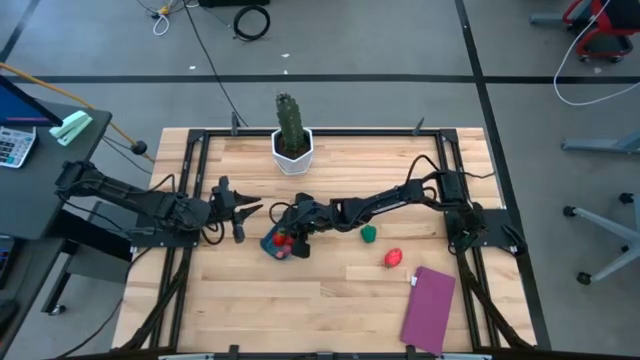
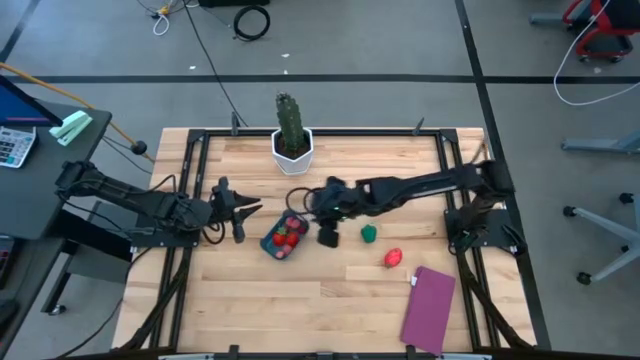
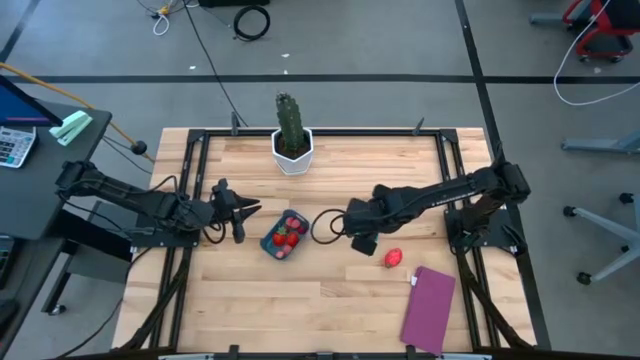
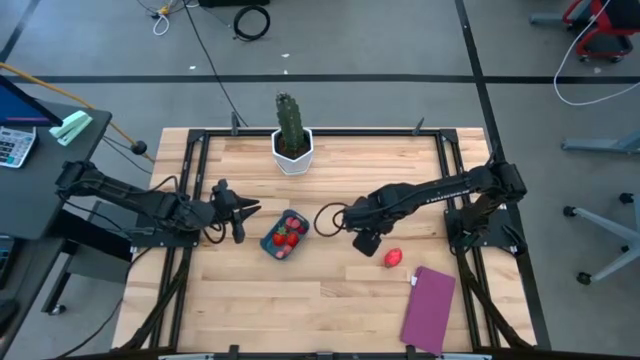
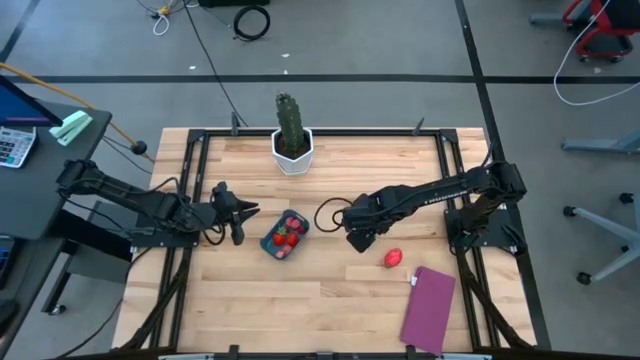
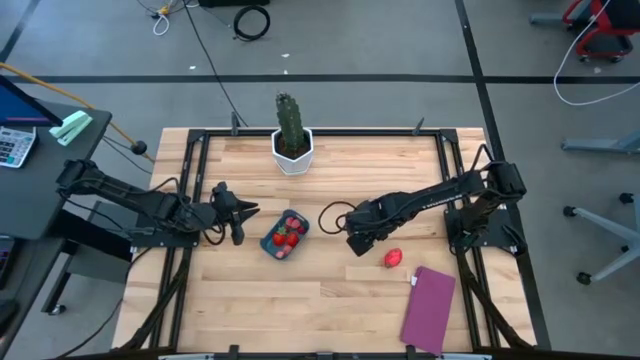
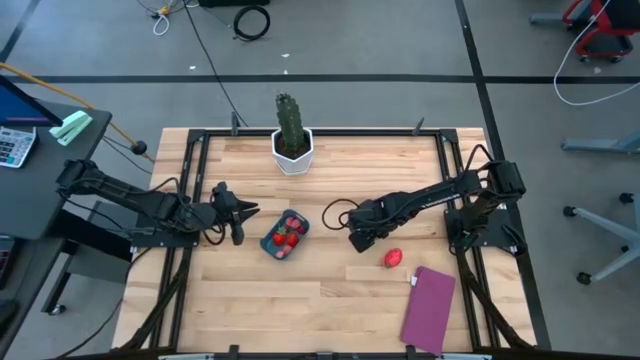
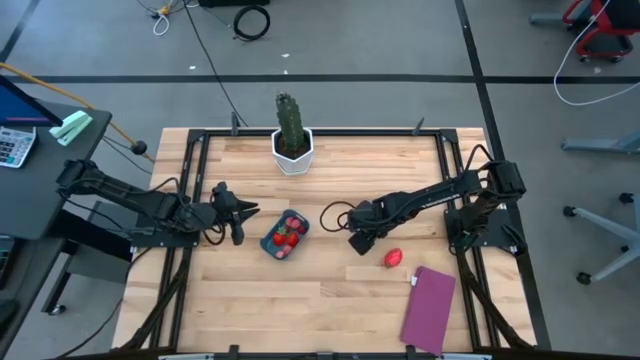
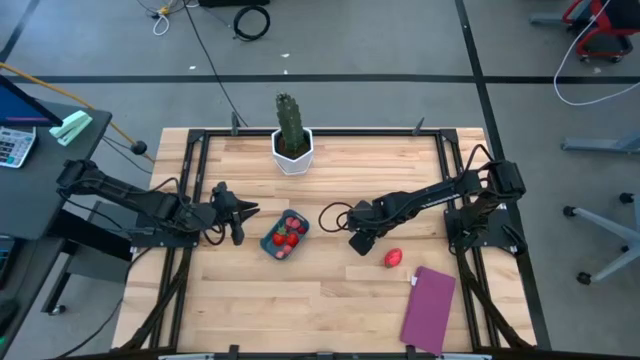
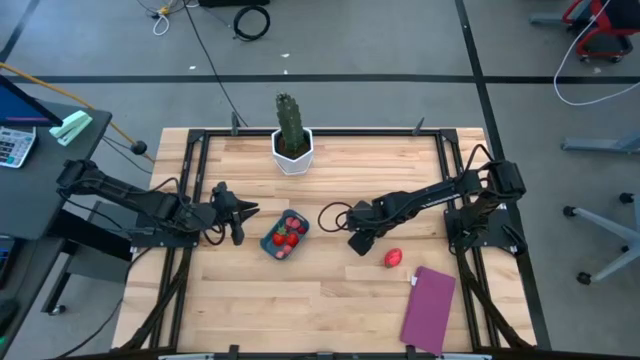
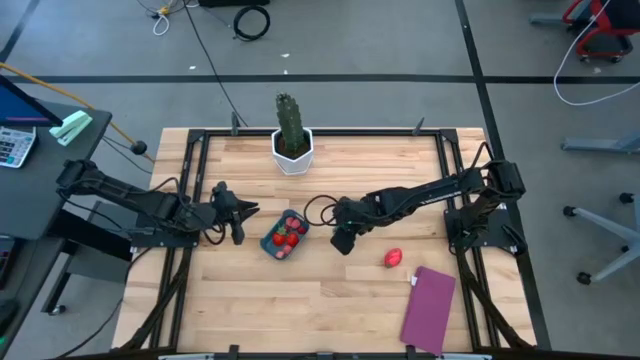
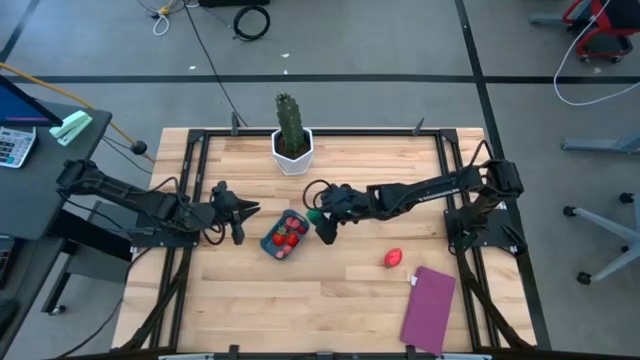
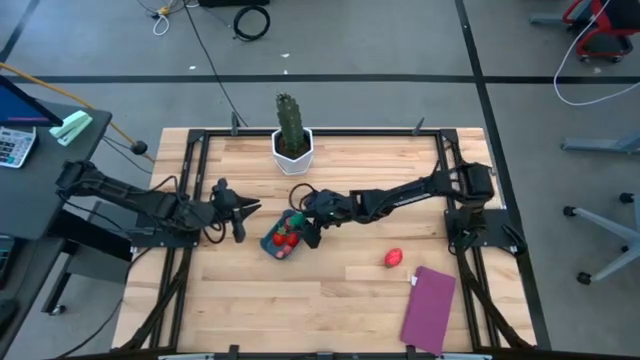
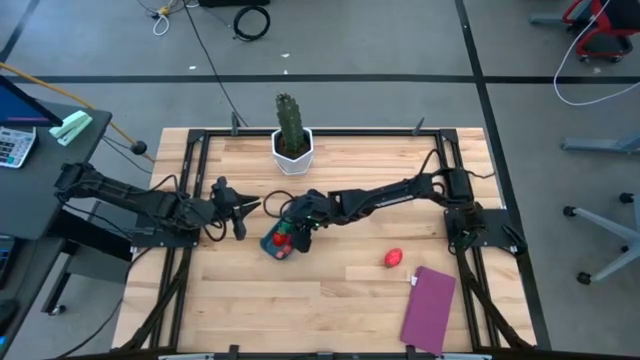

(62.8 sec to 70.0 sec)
Task: Pick and placing Produce into tupperware
Put the green bell pepper into the blue bin

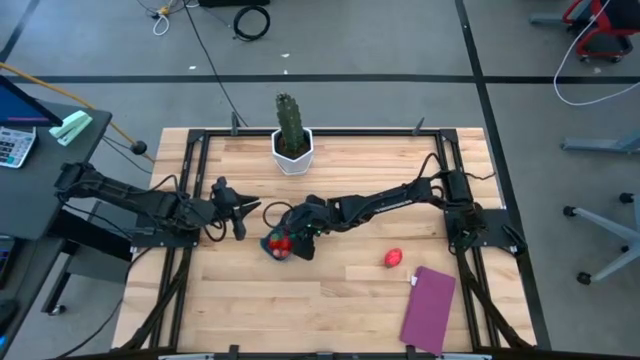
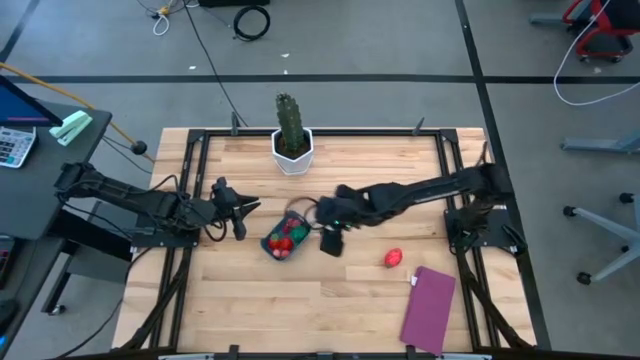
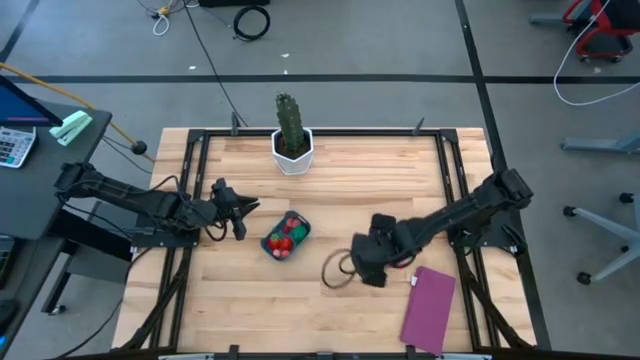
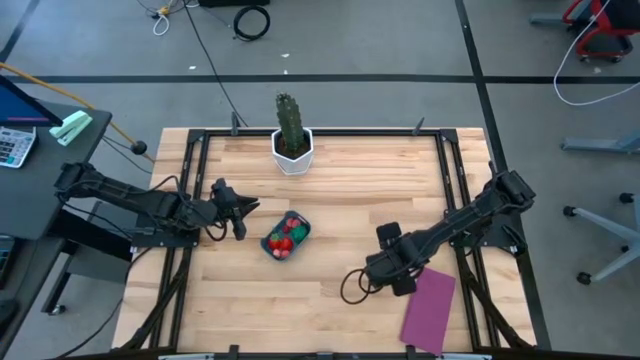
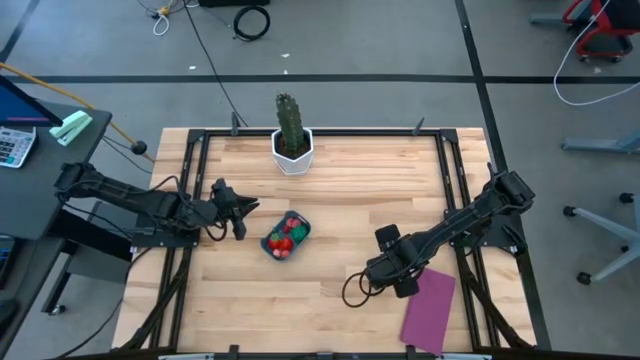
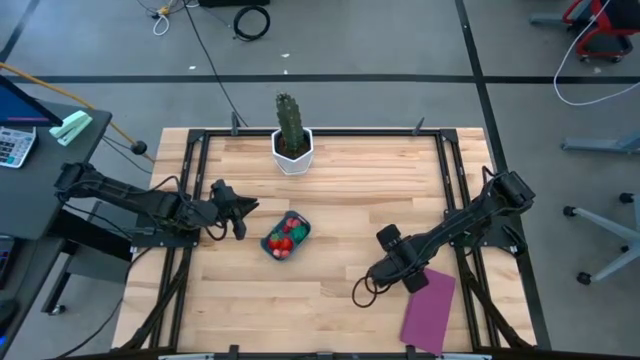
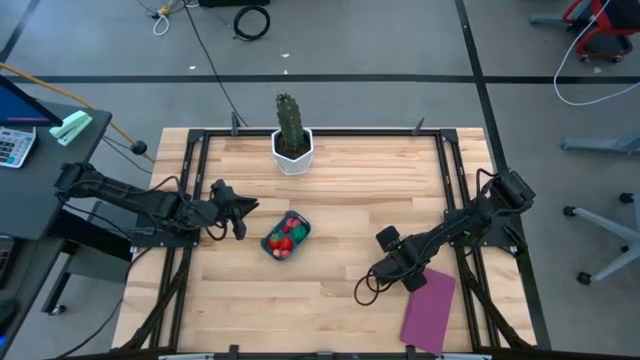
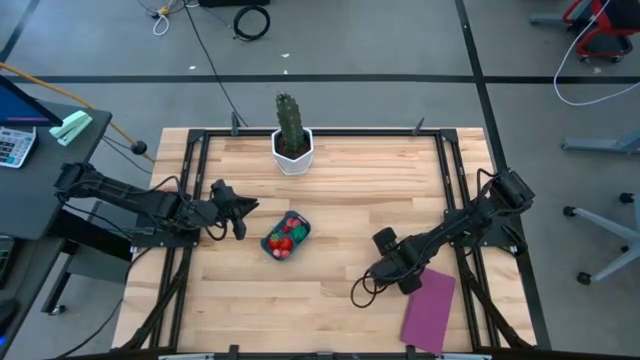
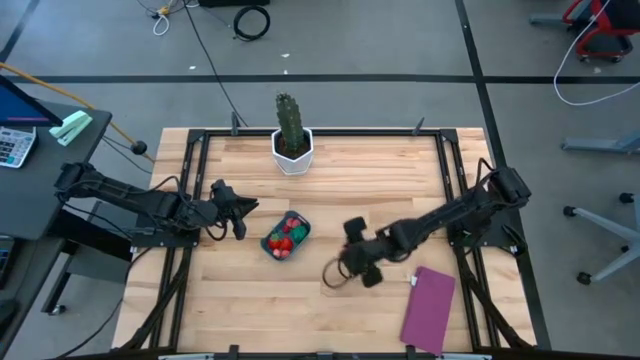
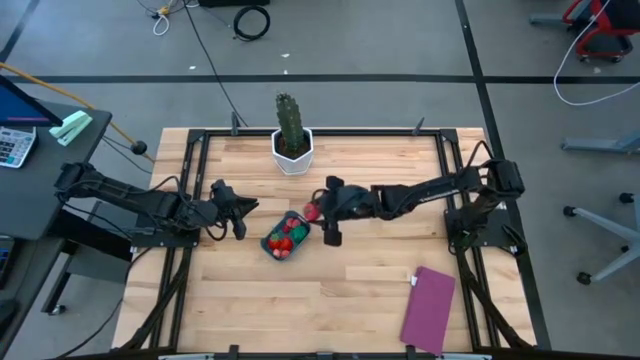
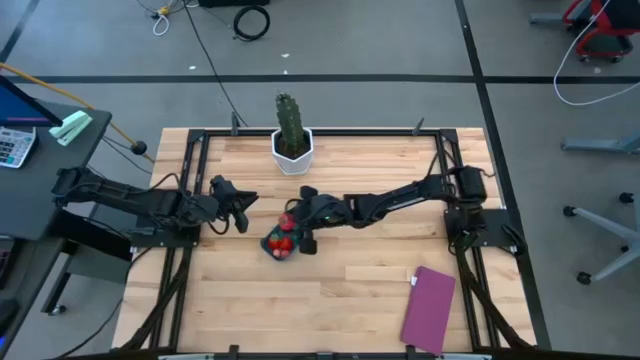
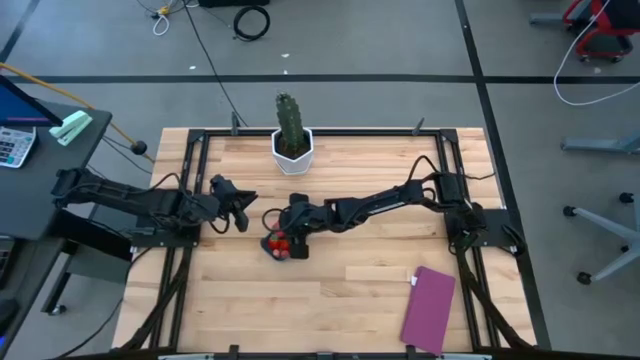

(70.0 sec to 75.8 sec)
Put the red dragon fruit into the blue bin

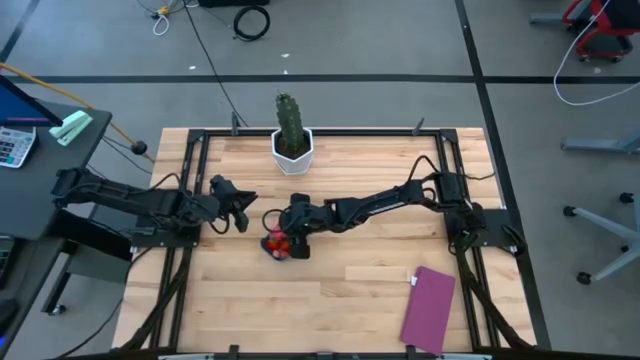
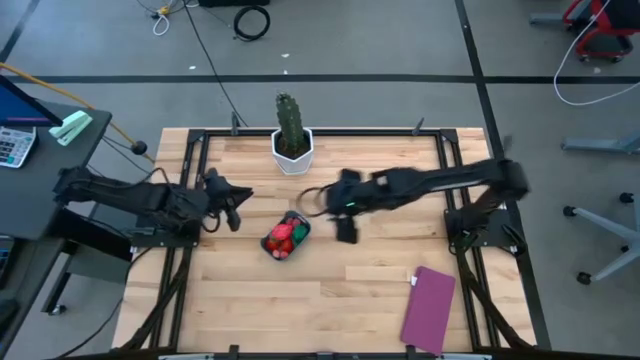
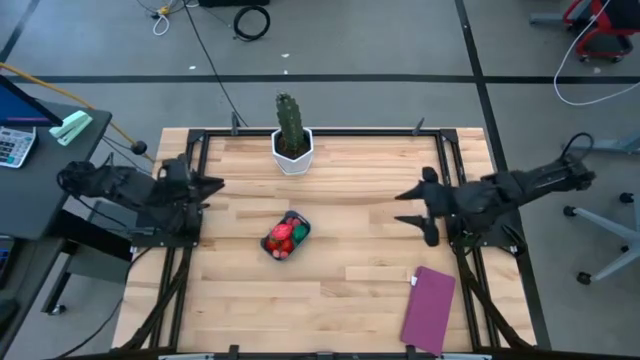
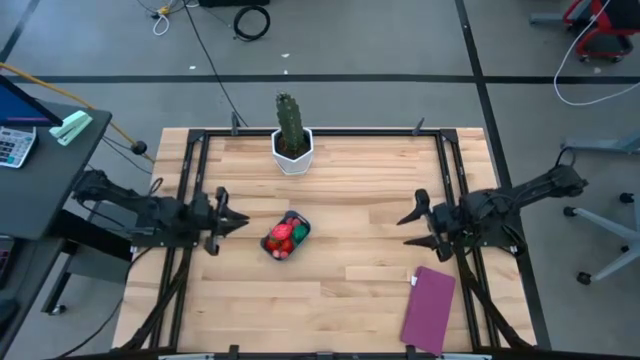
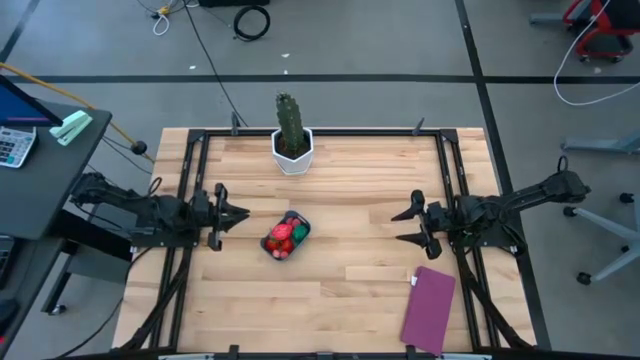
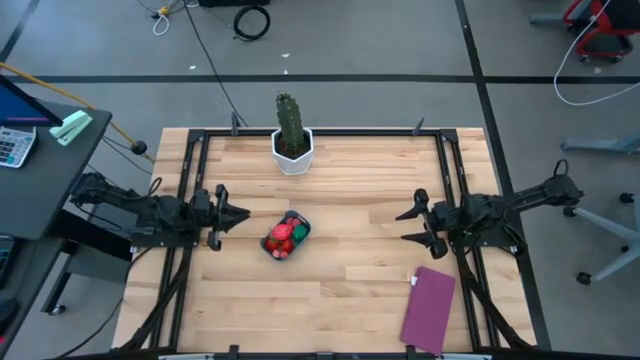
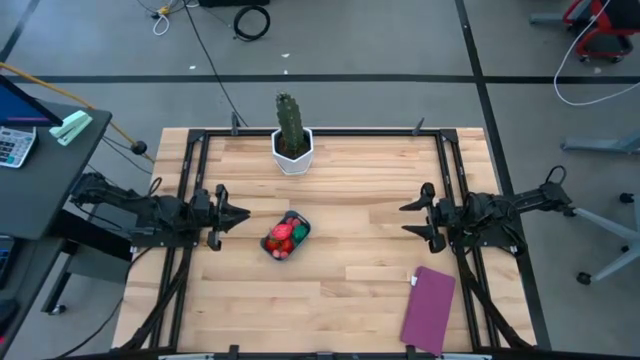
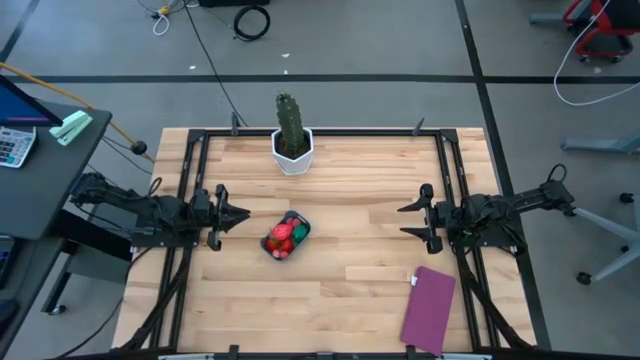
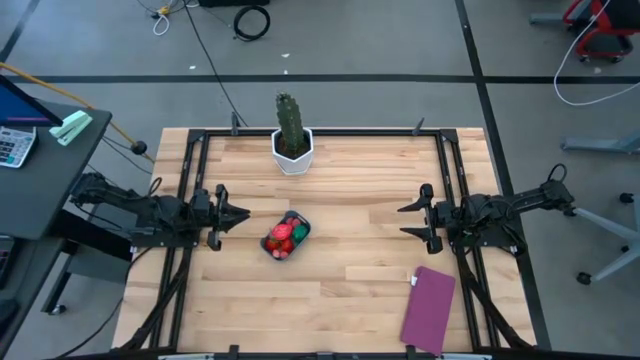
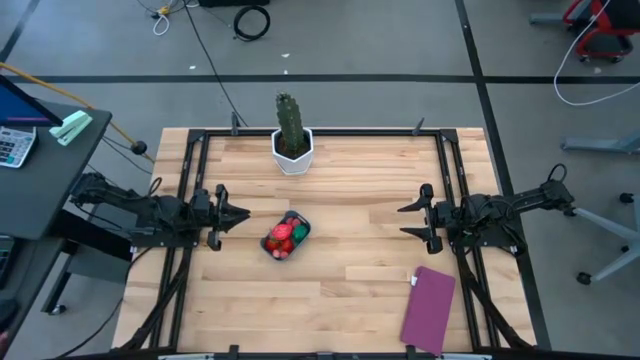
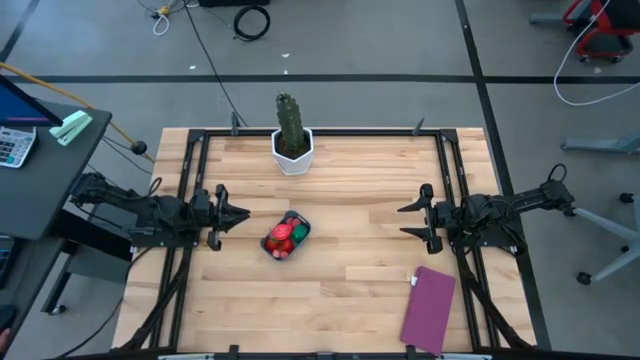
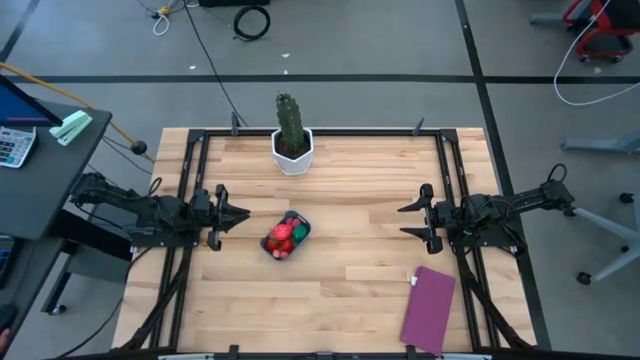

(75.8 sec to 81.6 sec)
Return to Home Position

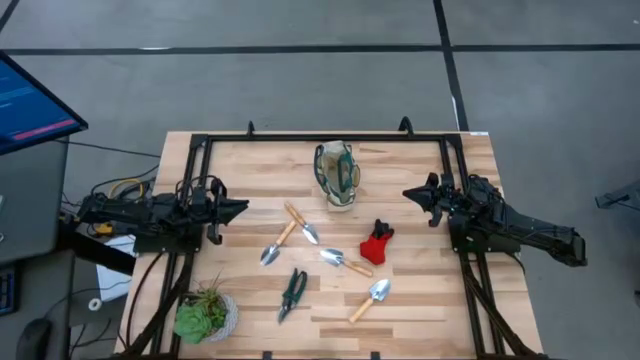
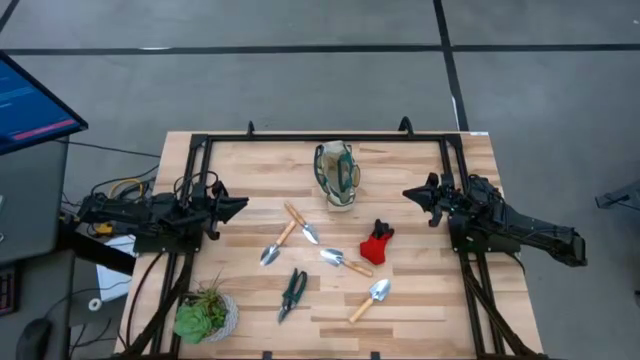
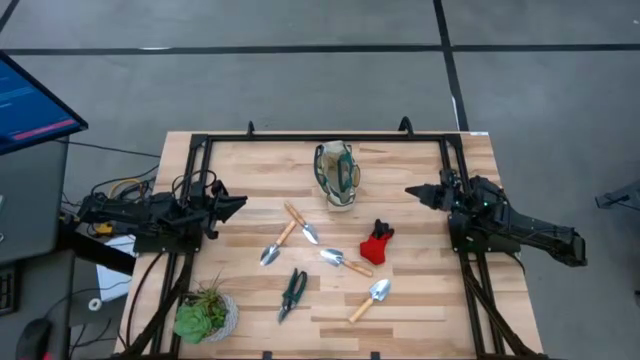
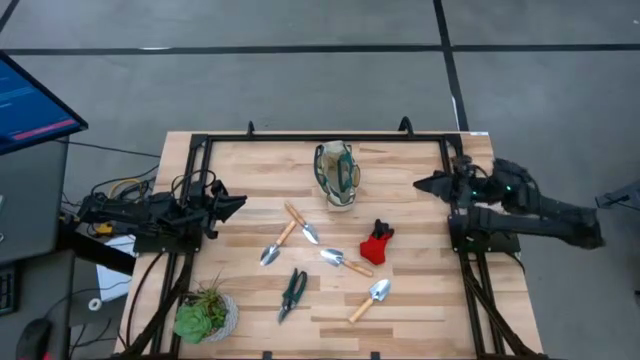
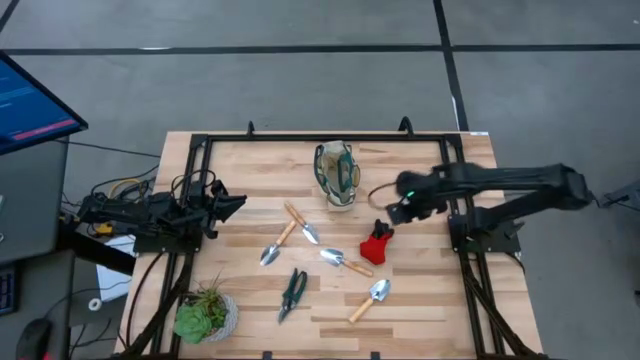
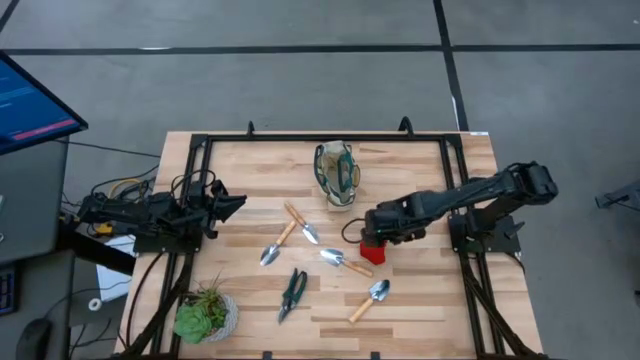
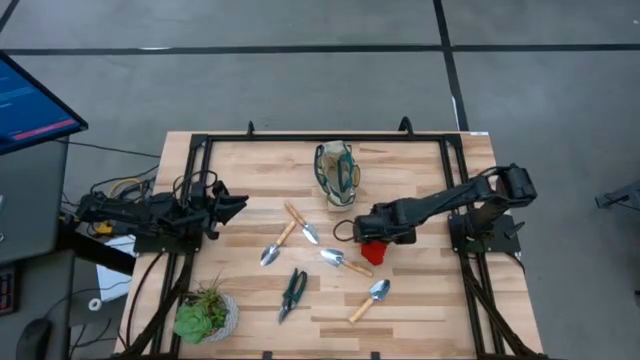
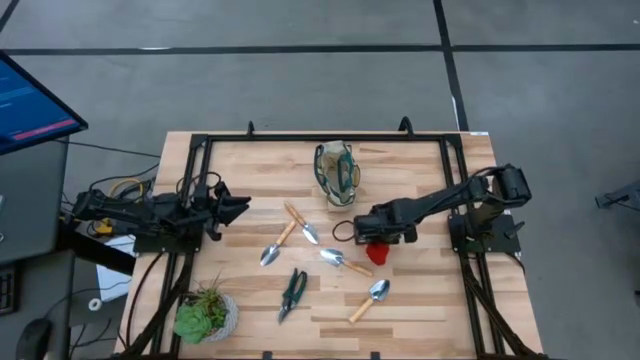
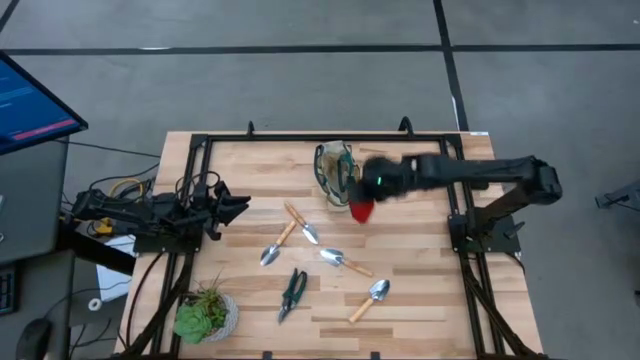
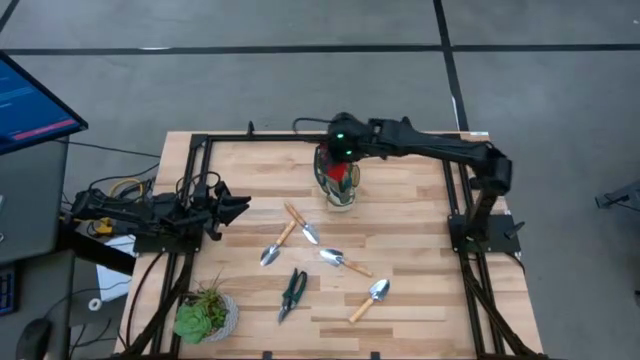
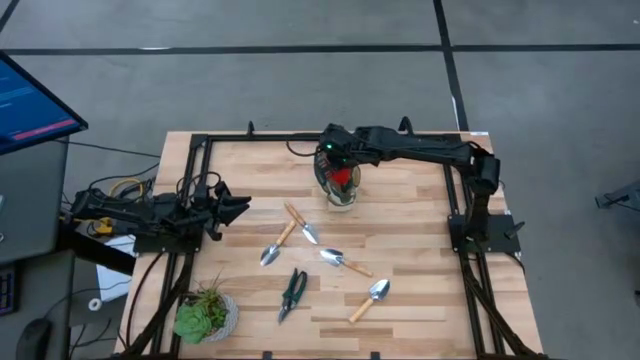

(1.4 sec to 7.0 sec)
Task: Pick & Place Garden tools in Gardening bag
Put the red gloves into the gardening bag
